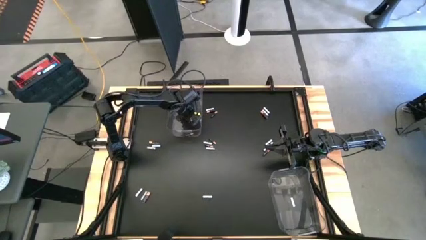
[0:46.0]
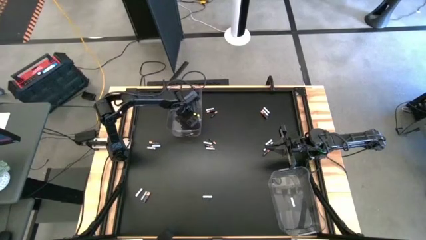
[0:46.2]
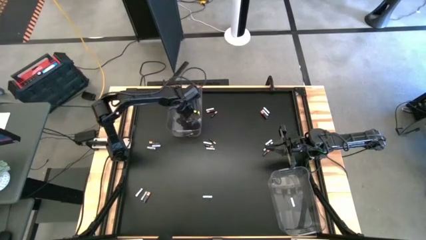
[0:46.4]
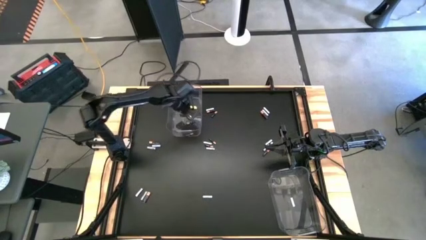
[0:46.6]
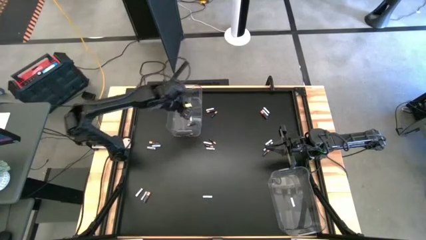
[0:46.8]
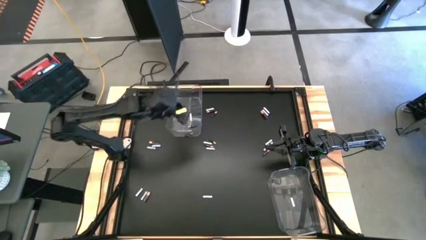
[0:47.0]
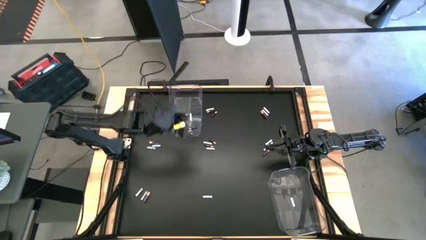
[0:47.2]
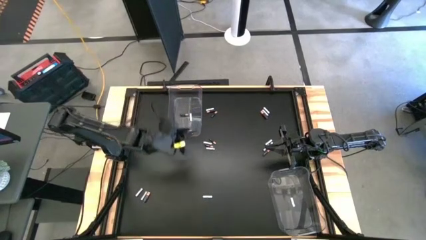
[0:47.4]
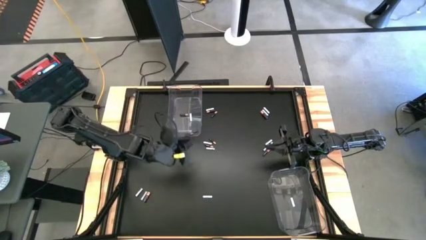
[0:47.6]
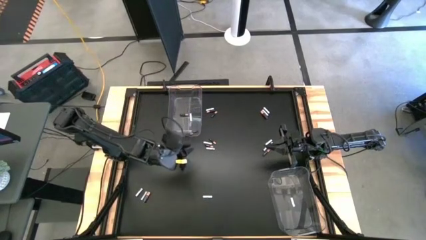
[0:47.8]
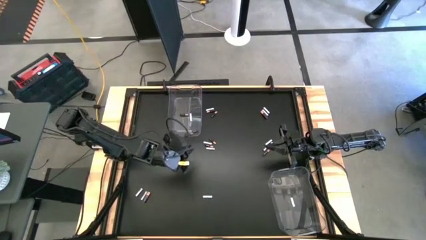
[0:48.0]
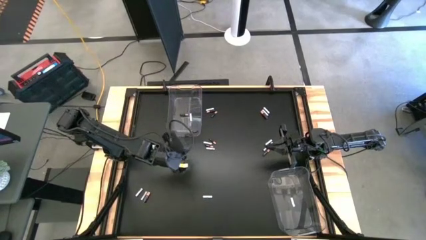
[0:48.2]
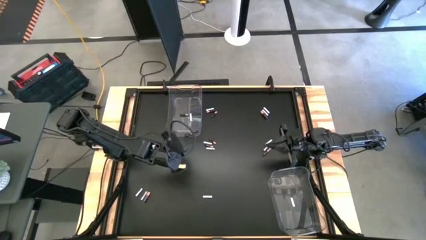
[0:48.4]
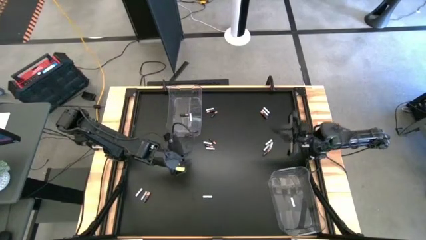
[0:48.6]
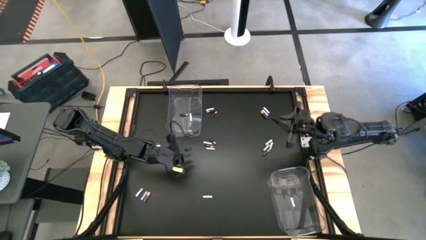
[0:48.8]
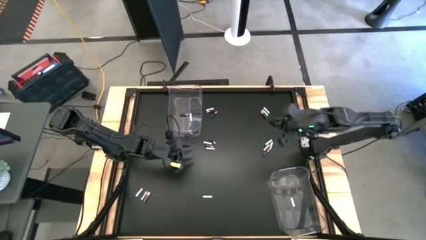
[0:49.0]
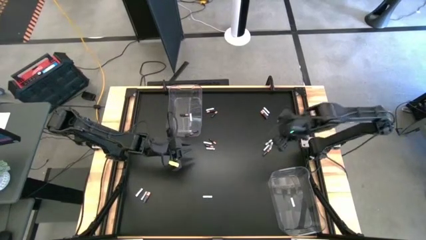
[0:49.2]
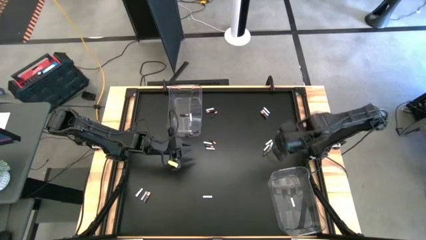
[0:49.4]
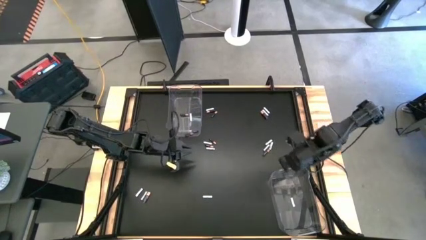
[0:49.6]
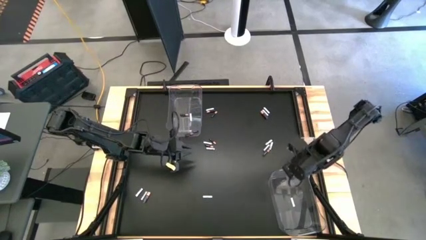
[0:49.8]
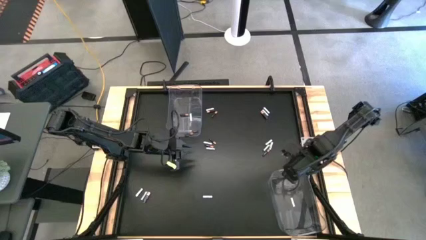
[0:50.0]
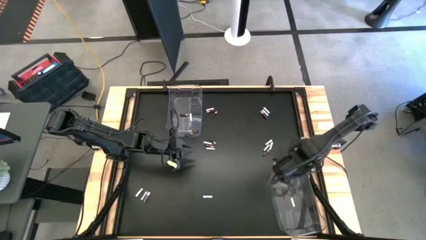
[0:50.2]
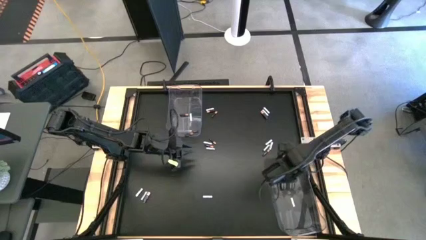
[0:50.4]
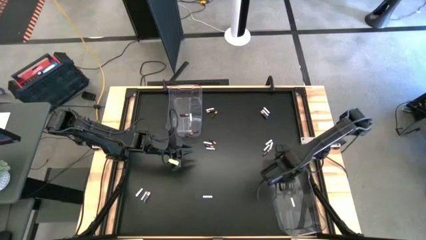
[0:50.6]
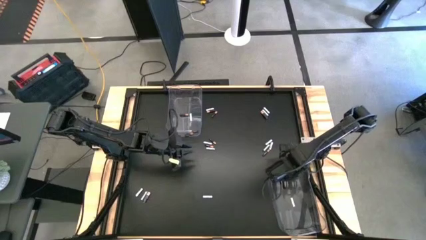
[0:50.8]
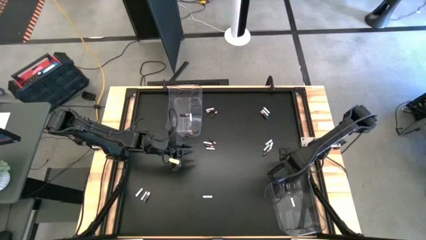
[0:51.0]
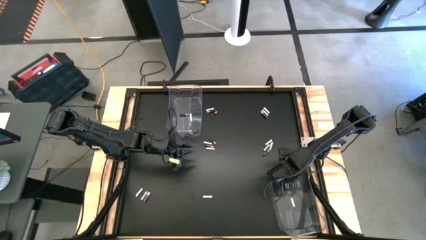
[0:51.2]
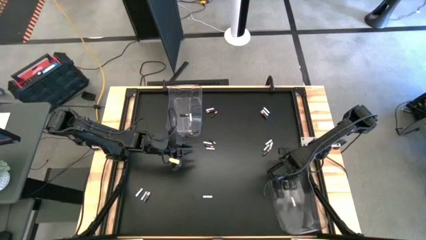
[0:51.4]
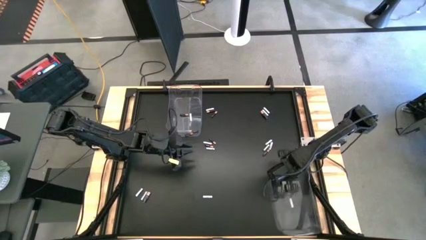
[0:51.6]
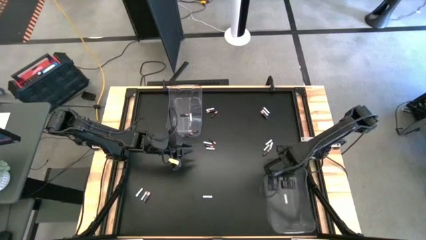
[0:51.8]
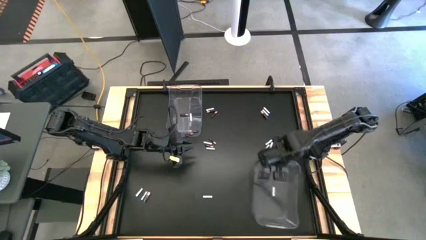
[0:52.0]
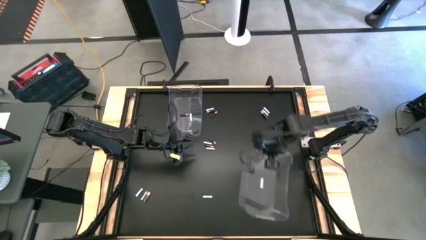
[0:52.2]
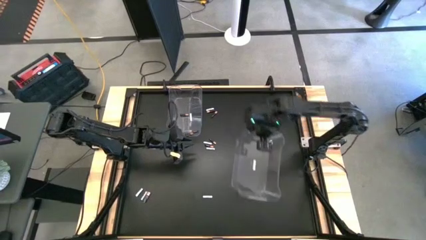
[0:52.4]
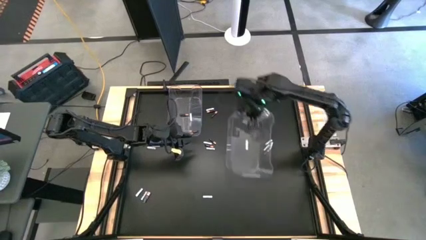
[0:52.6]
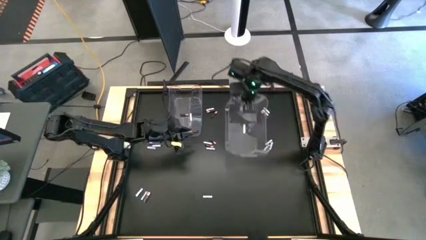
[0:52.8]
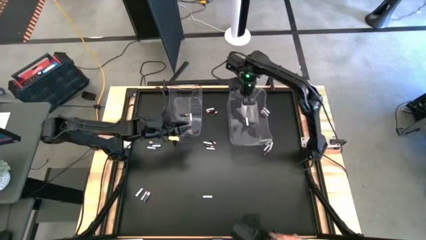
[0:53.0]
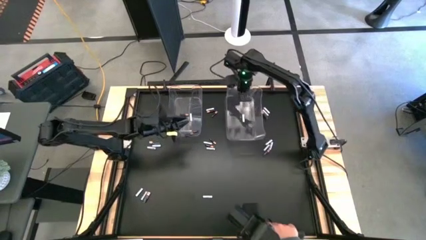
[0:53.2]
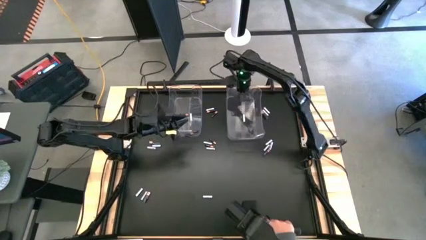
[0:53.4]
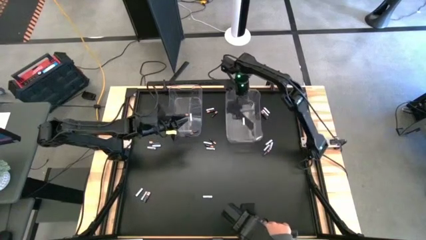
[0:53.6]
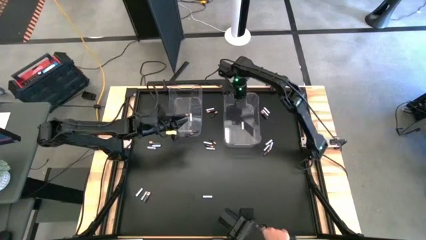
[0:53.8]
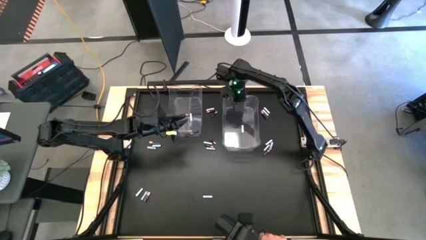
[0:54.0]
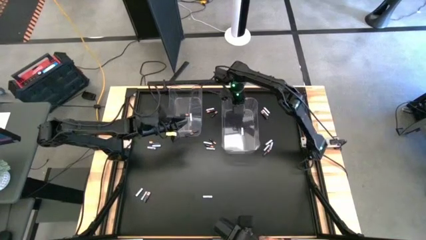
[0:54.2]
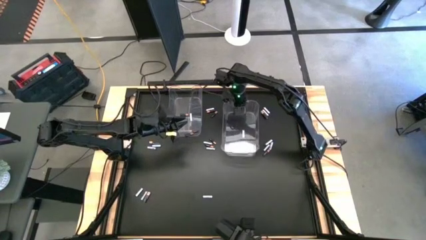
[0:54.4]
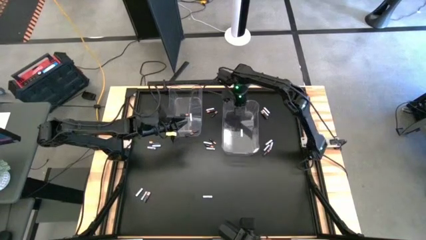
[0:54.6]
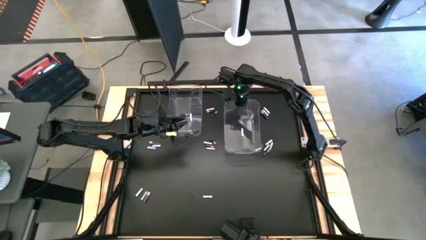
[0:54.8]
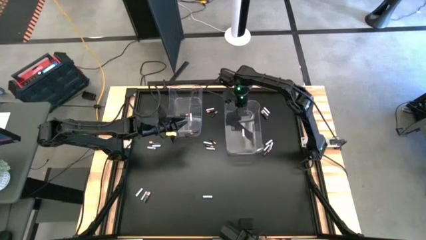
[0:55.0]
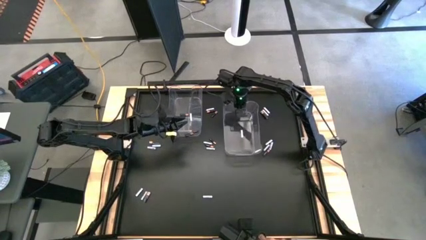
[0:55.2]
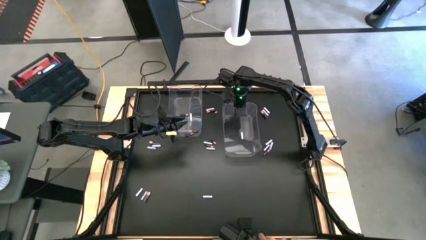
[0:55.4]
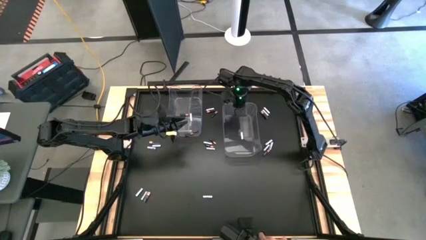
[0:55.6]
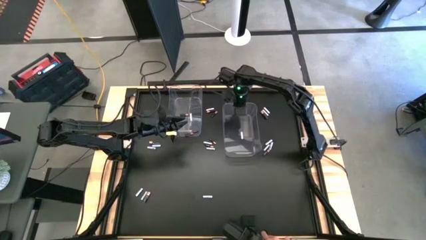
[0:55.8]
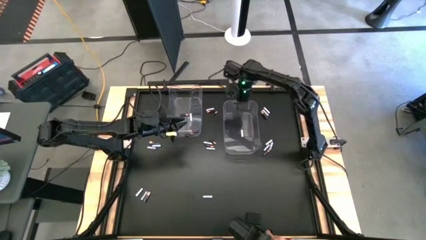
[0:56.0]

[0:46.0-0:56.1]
Task: Sort batteries
Move the bottom transparent bin to the top of the table

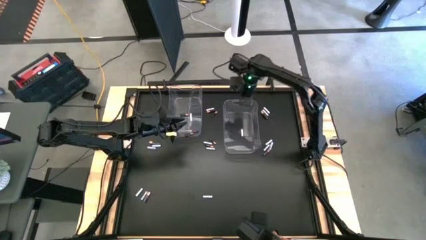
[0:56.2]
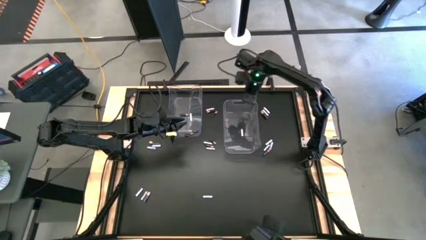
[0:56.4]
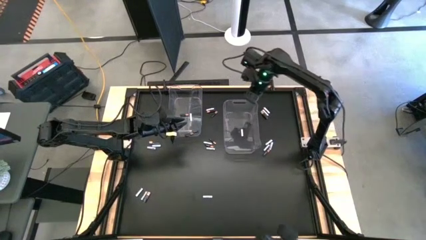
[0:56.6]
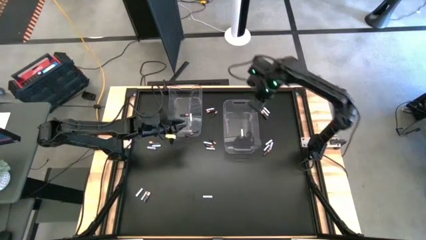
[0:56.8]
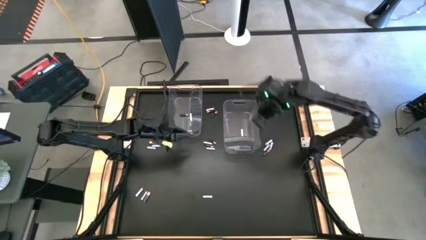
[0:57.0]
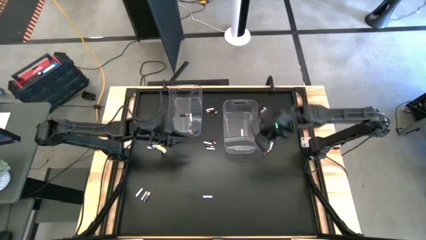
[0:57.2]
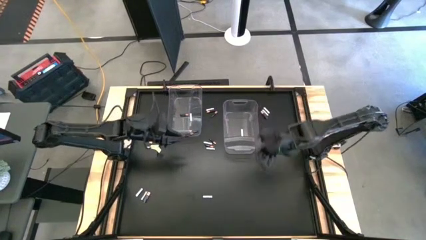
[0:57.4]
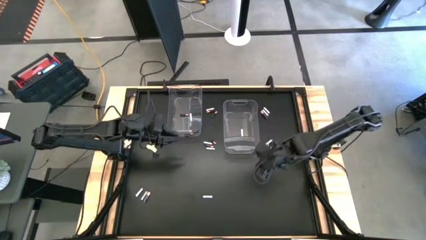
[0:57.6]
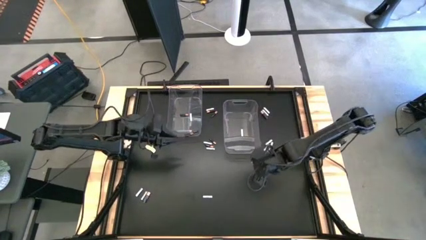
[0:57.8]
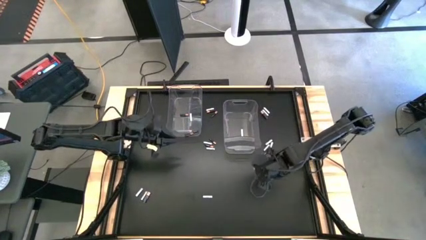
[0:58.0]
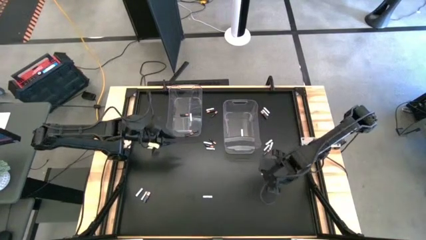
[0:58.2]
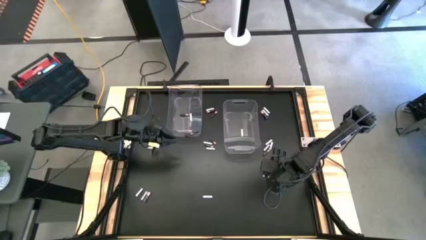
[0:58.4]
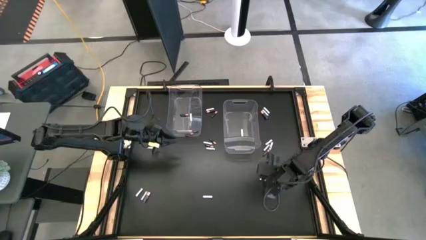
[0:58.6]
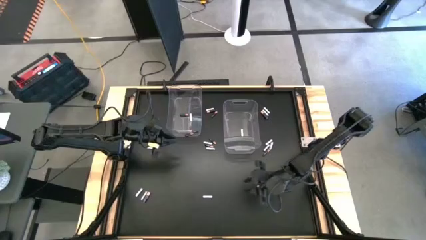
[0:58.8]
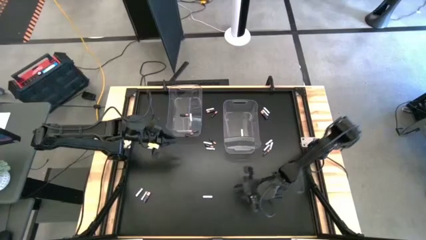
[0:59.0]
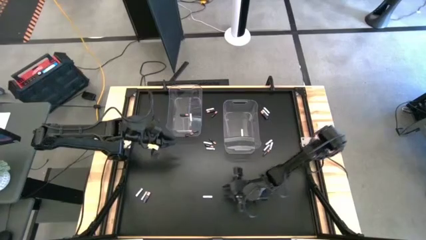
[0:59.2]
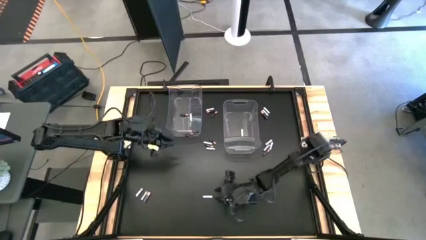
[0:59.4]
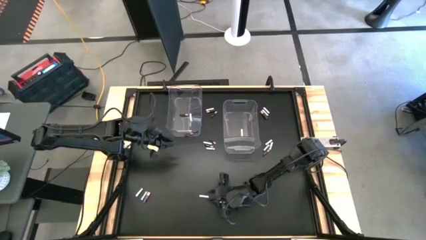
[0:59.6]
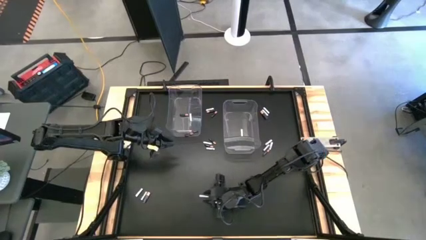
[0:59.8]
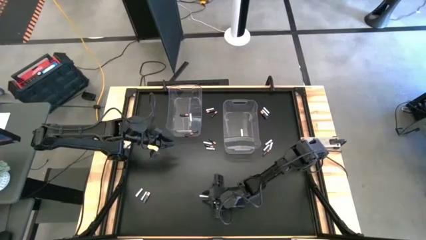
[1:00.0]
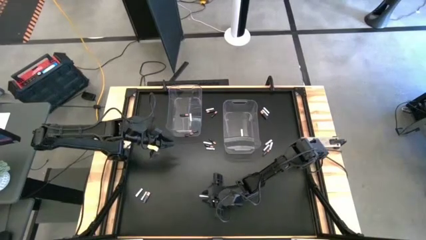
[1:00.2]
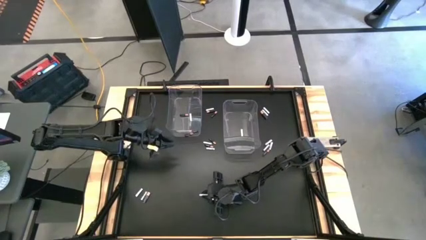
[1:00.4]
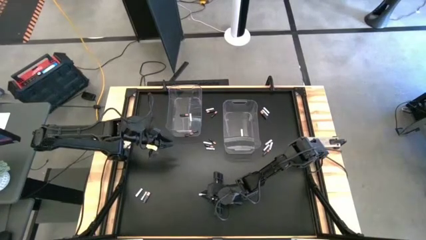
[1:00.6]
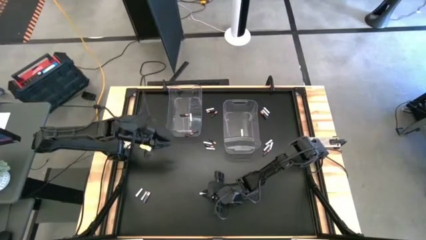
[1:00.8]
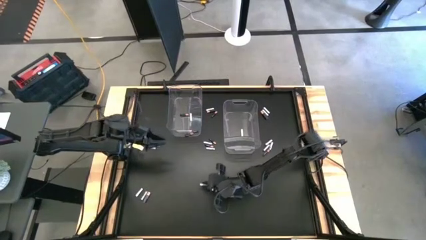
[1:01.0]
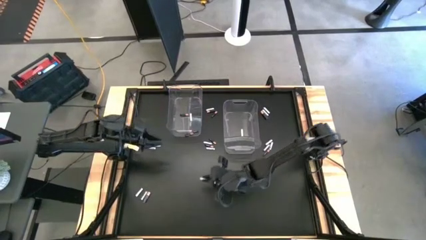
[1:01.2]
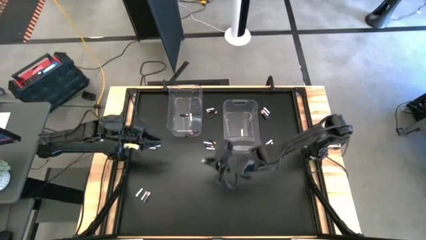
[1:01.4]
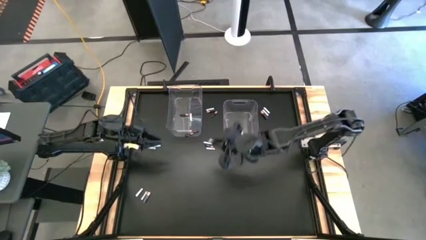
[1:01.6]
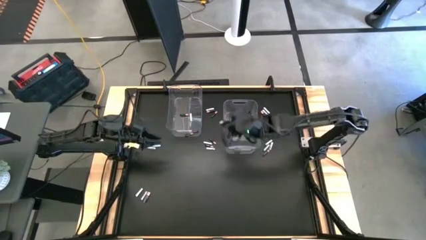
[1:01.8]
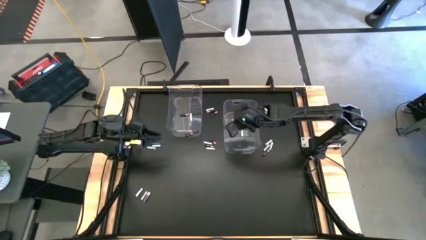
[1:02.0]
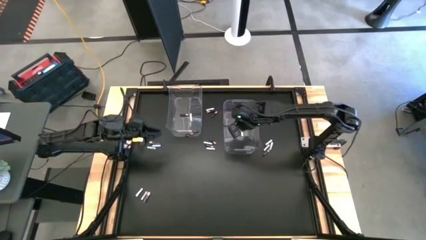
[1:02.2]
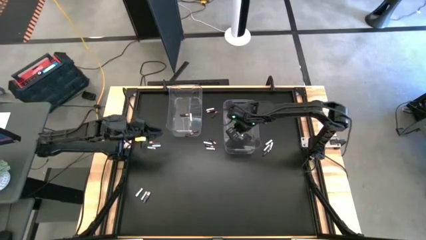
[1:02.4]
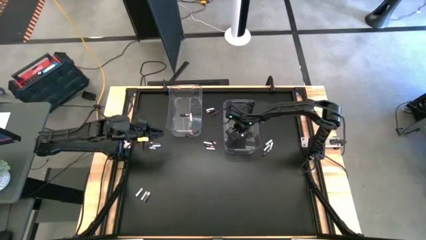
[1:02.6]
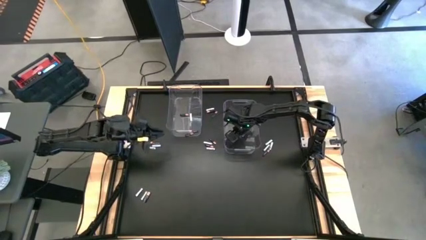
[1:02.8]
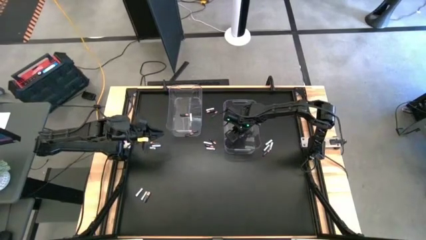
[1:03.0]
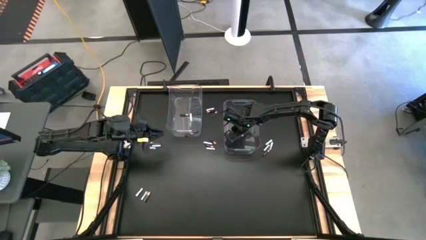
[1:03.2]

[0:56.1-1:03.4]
Put the white battery into the right transparent bin
